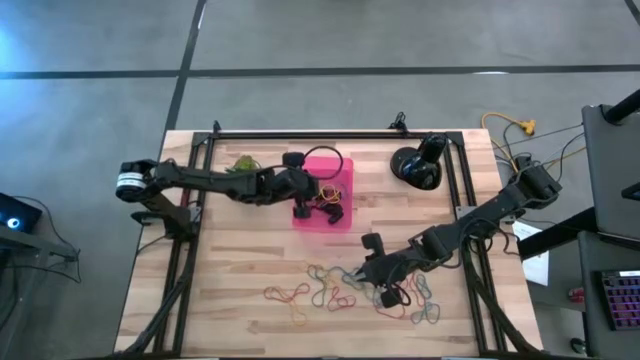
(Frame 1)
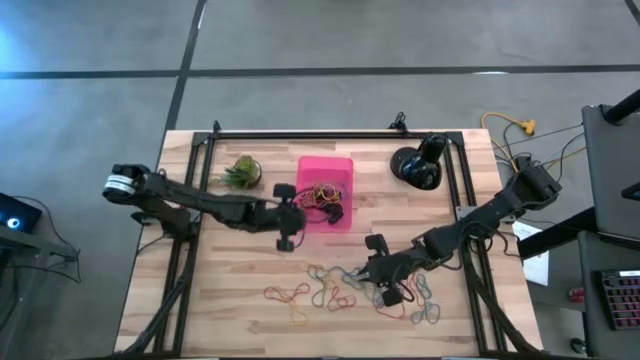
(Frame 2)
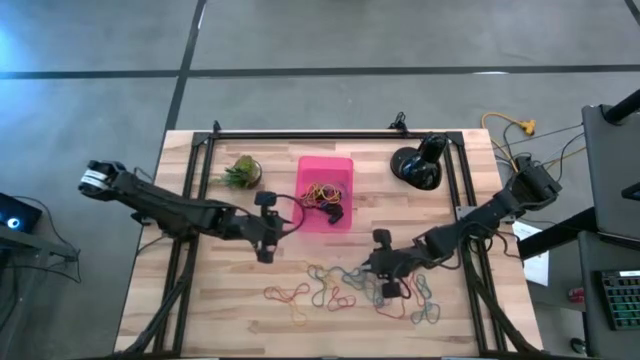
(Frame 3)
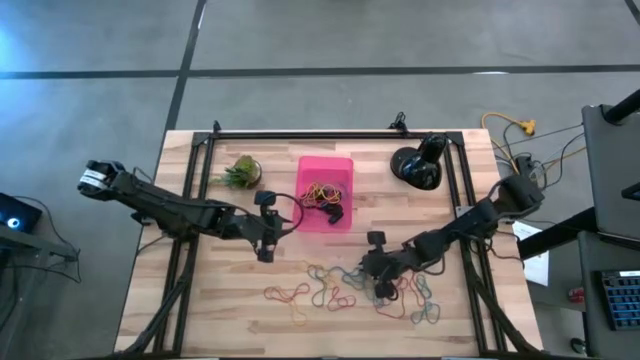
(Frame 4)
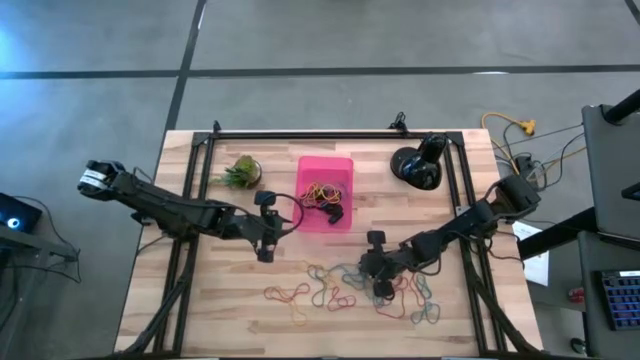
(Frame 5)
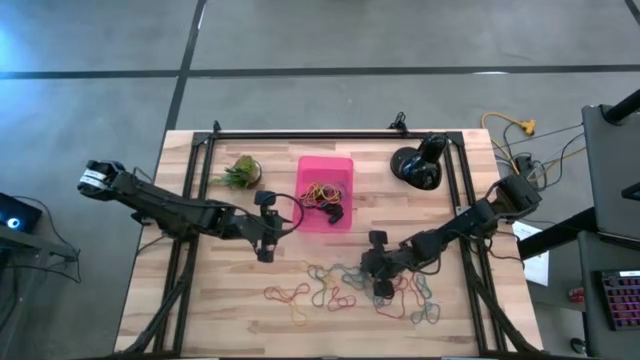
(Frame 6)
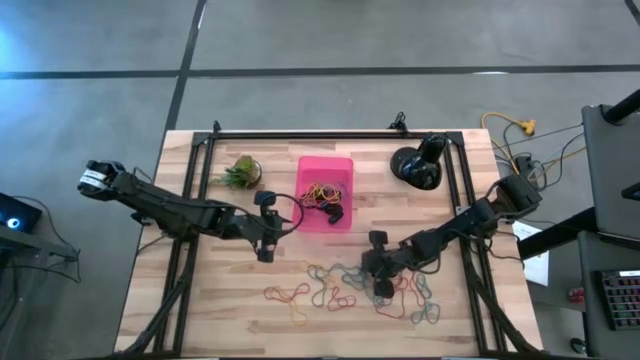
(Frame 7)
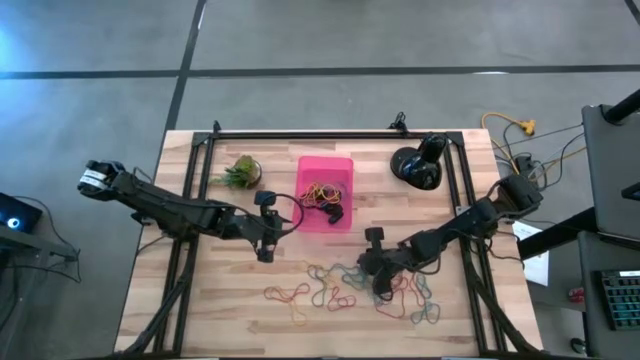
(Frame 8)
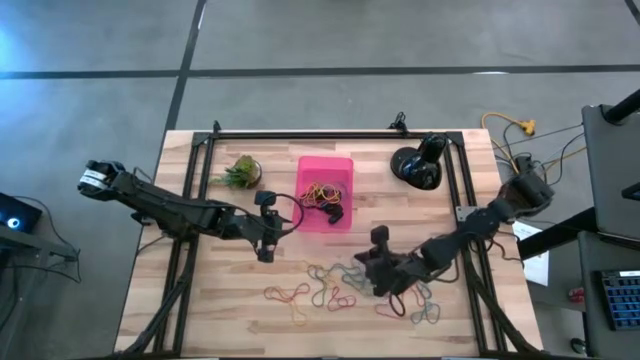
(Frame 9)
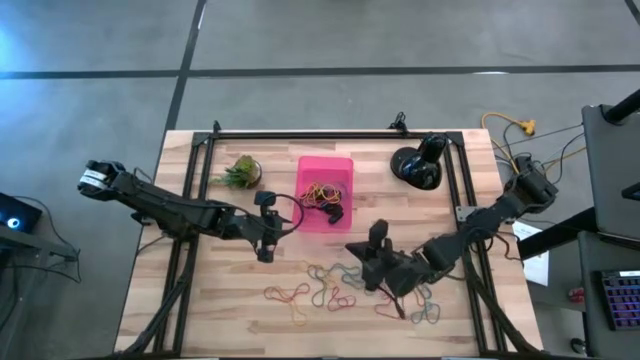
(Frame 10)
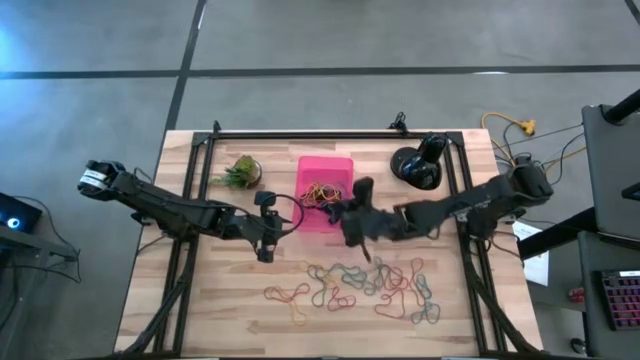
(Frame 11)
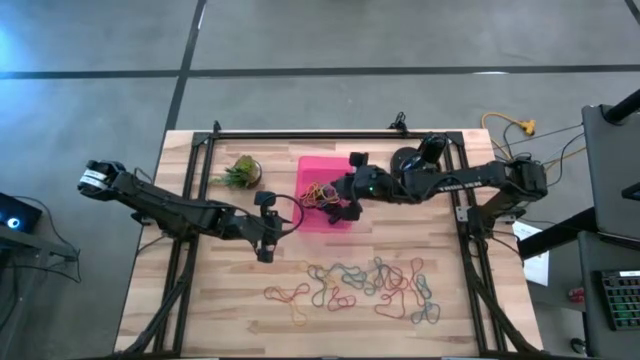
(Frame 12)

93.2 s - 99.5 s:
Task: Pick and place rubber bands into bin
Put the blue rubber bands into the pink bin

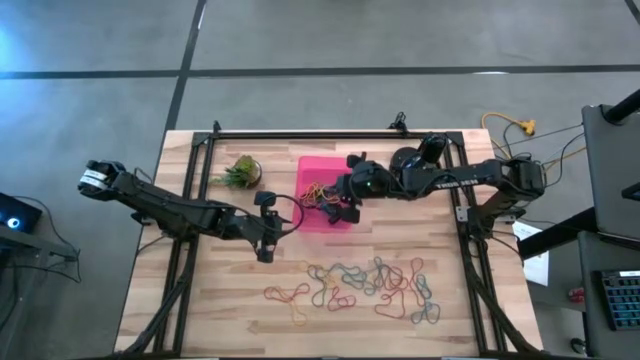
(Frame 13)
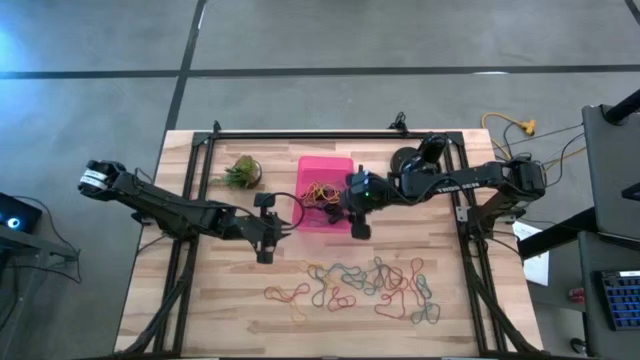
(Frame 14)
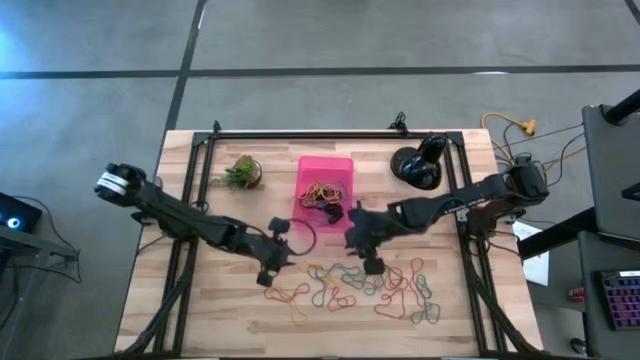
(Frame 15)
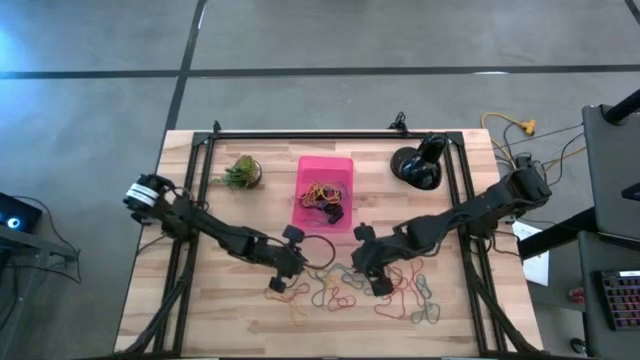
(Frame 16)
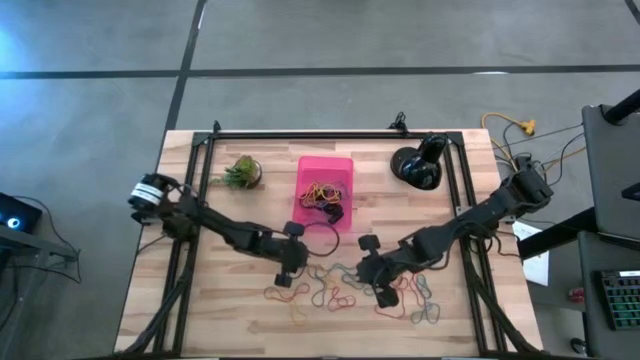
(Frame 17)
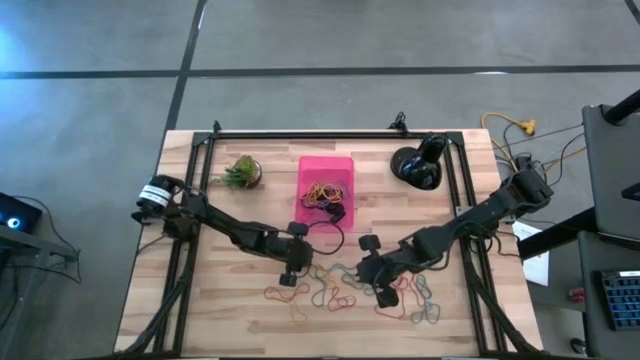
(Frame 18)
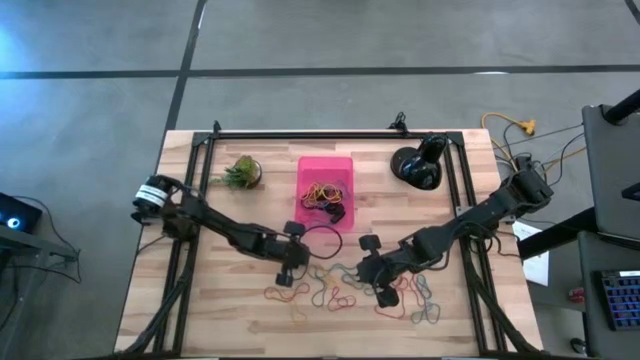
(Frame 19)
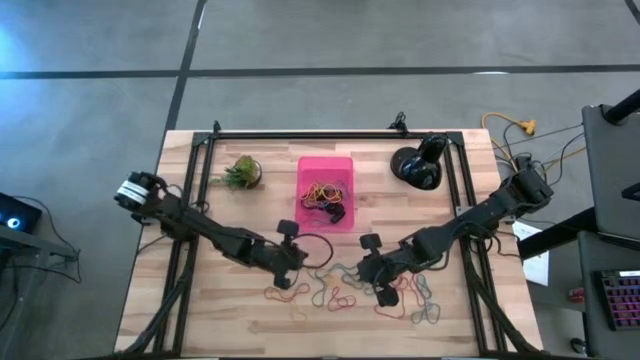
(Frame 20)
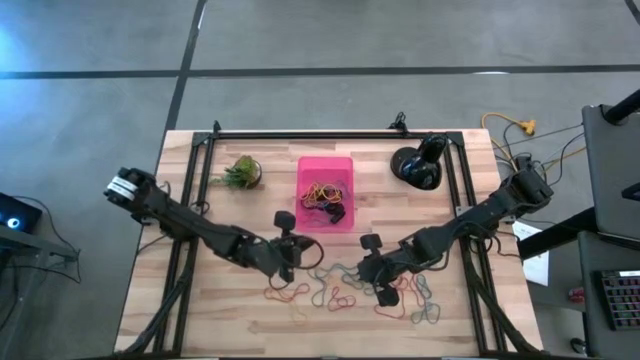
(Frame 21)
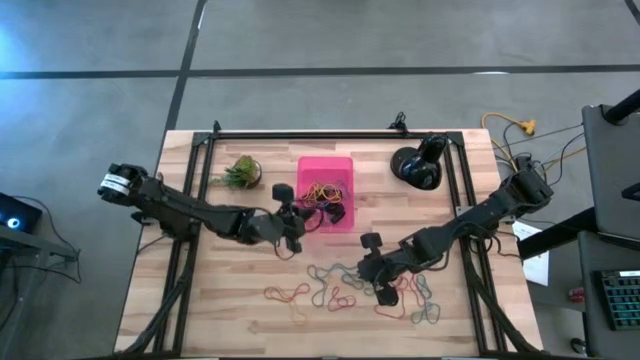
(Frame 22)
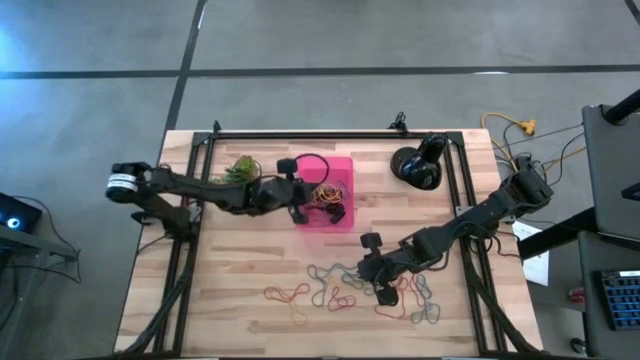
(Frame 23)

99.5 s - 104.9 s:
Put the yellow rubber bands into the pink bin

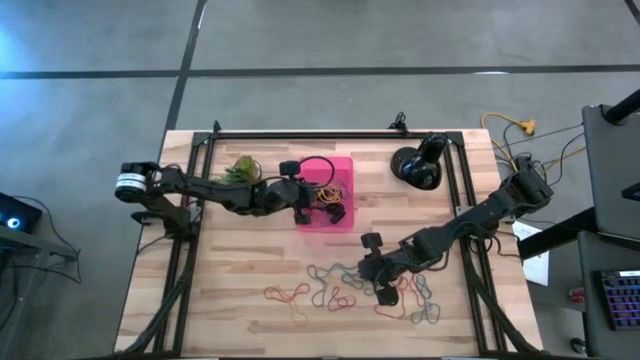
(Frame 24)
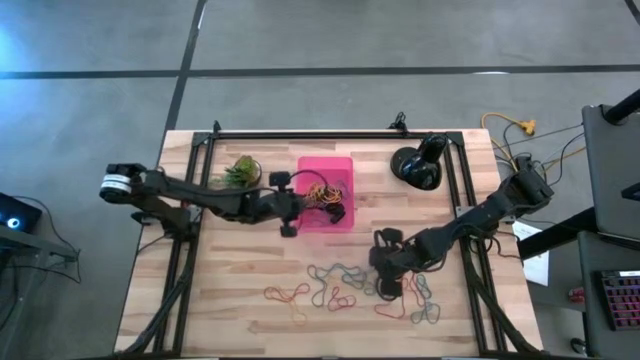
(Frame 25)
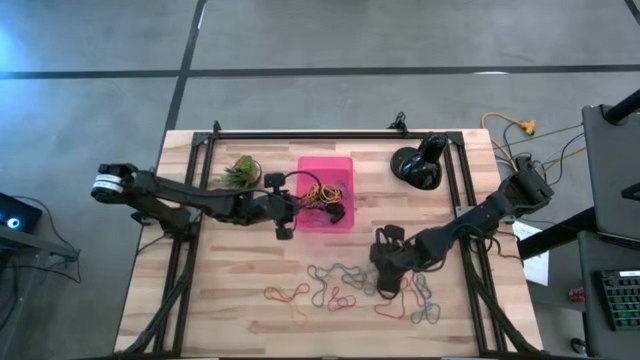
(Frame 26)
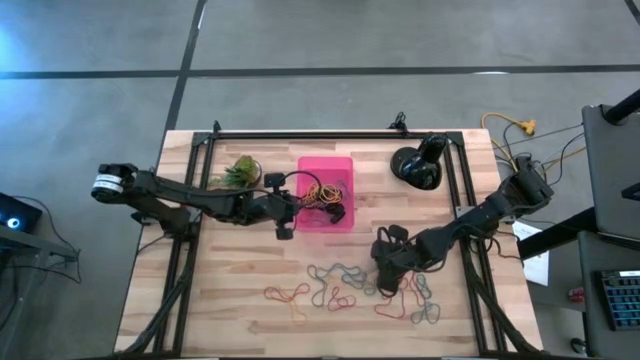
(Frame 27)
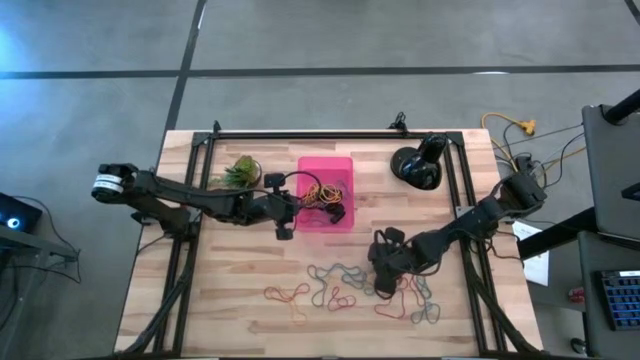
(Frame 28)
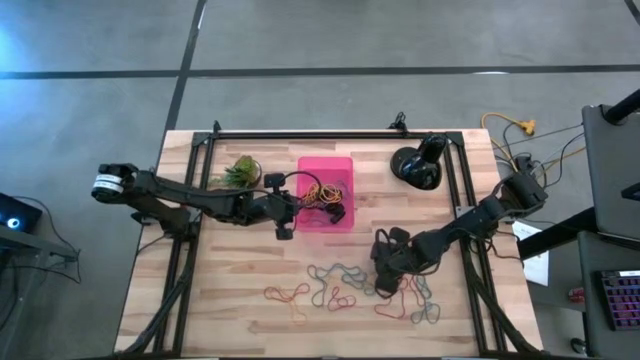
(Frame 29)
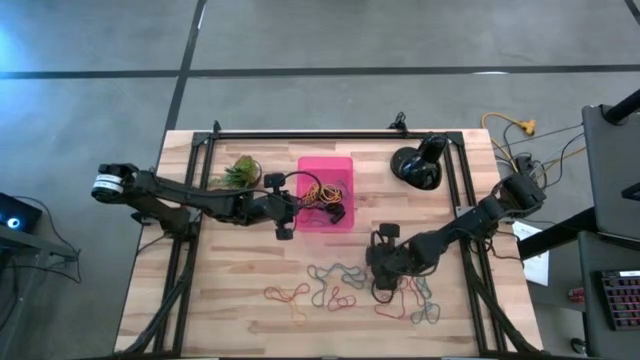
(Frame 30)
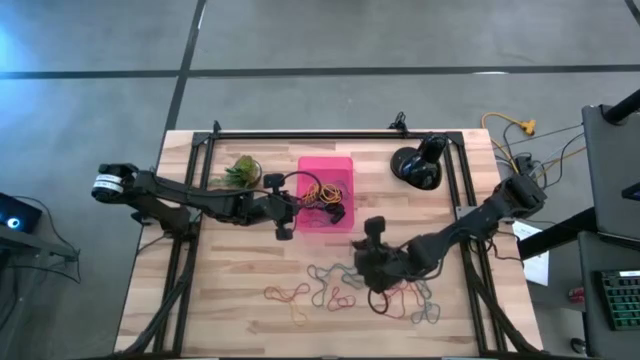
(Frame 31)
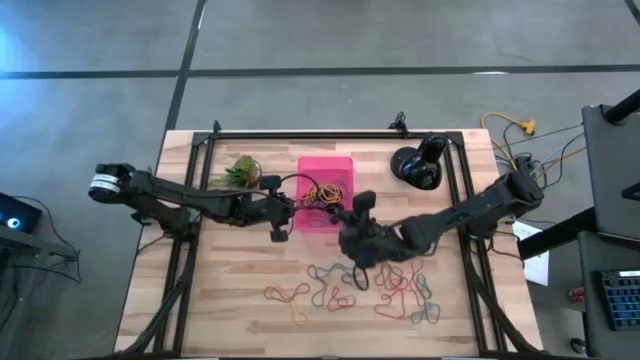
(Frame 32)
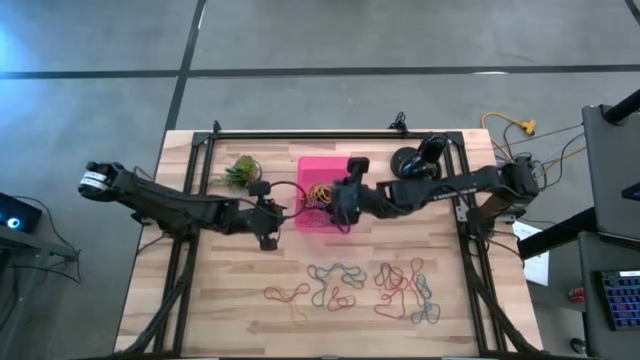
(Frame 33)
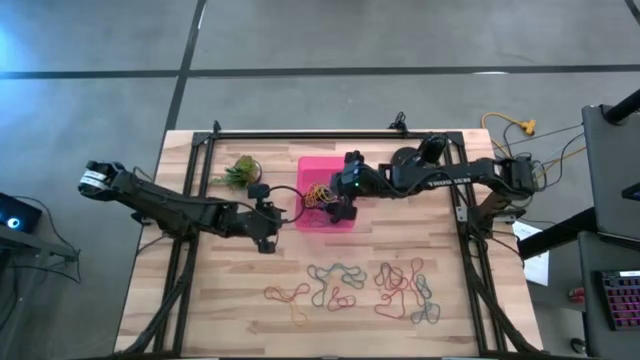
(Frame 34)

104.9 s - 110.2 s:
Put the blue rubber bands into the pink bin
